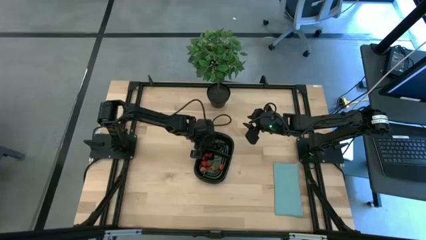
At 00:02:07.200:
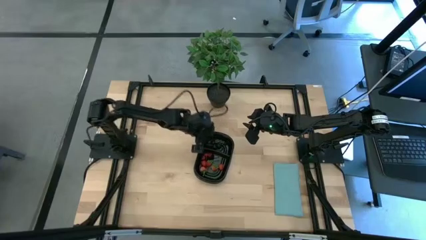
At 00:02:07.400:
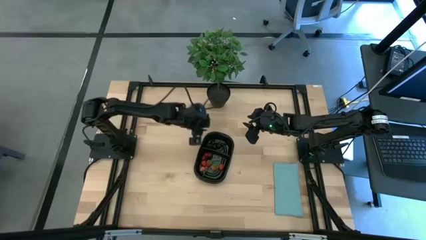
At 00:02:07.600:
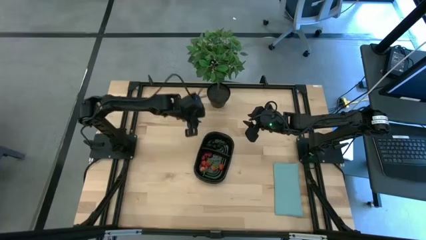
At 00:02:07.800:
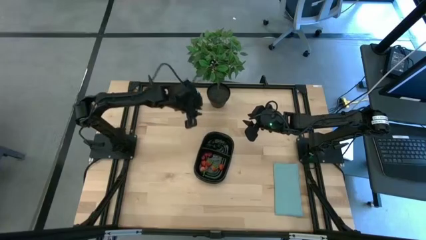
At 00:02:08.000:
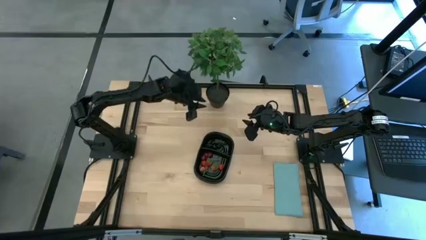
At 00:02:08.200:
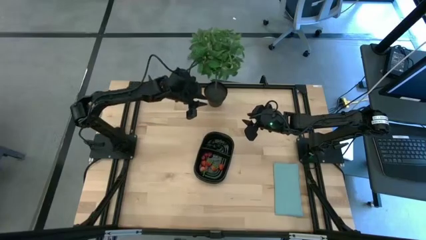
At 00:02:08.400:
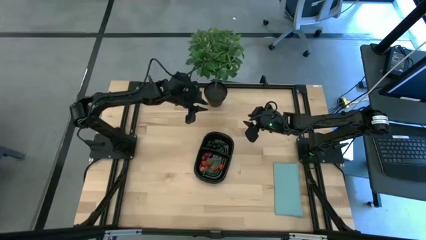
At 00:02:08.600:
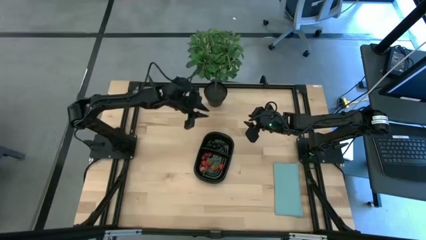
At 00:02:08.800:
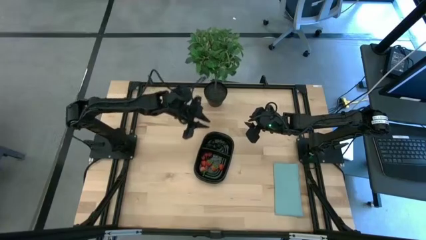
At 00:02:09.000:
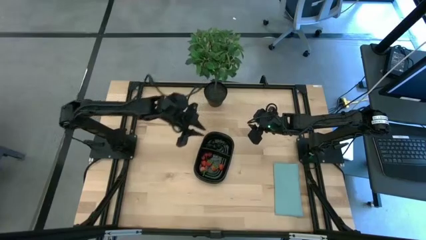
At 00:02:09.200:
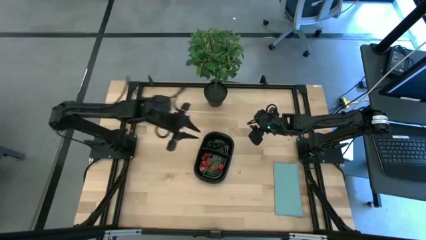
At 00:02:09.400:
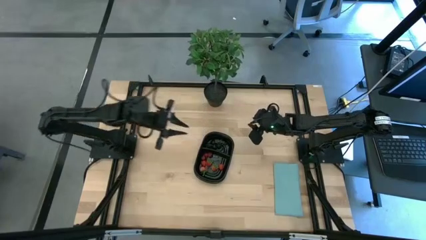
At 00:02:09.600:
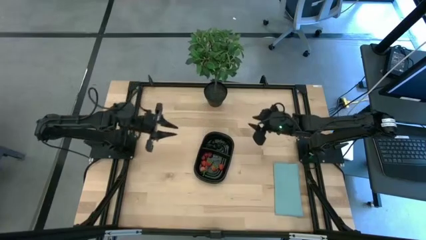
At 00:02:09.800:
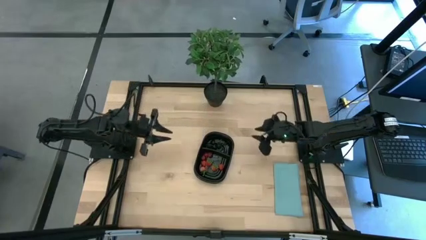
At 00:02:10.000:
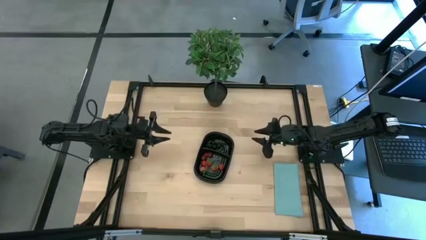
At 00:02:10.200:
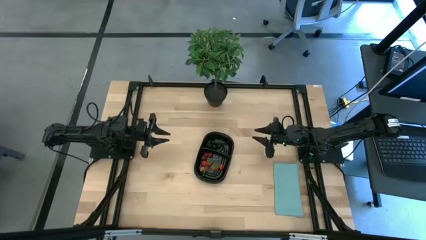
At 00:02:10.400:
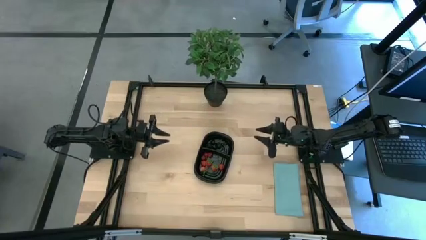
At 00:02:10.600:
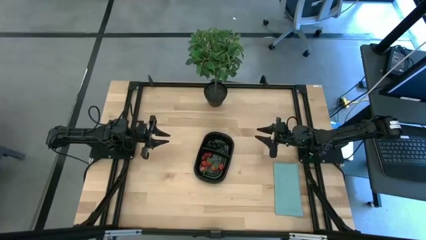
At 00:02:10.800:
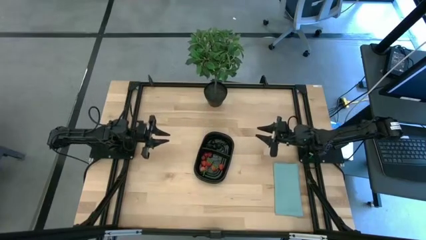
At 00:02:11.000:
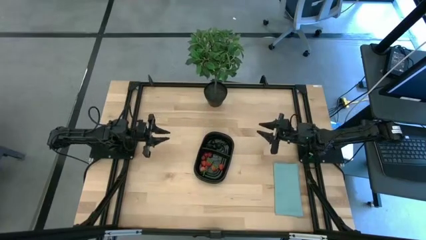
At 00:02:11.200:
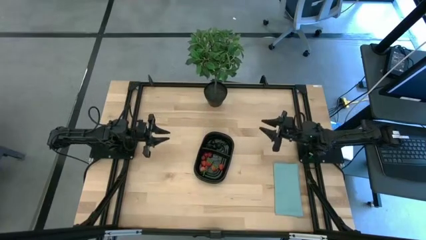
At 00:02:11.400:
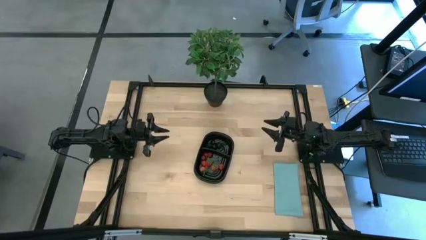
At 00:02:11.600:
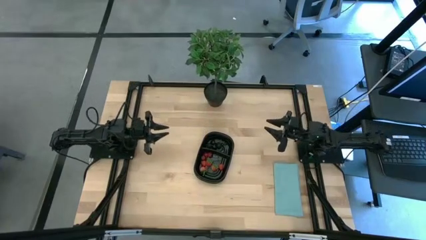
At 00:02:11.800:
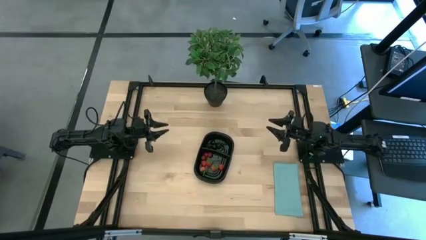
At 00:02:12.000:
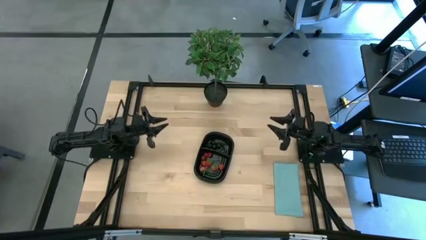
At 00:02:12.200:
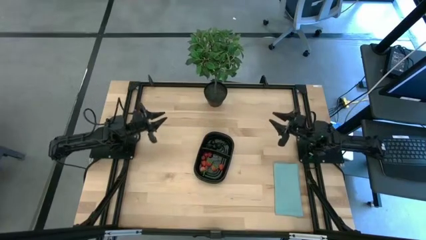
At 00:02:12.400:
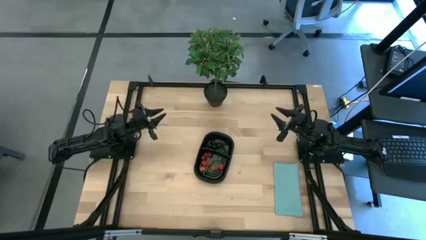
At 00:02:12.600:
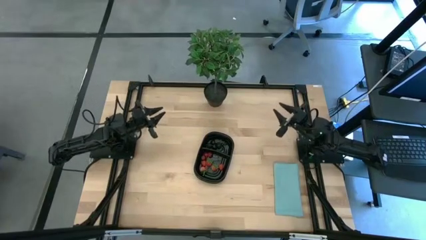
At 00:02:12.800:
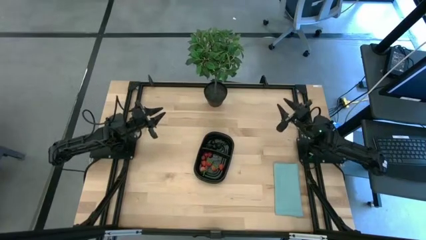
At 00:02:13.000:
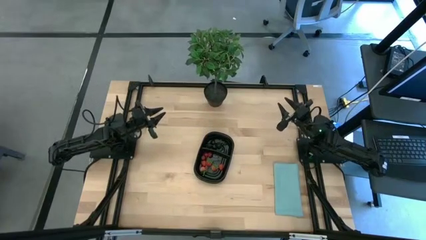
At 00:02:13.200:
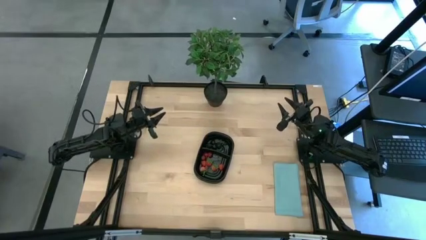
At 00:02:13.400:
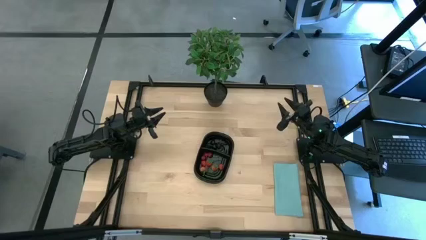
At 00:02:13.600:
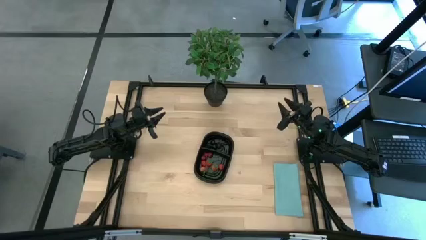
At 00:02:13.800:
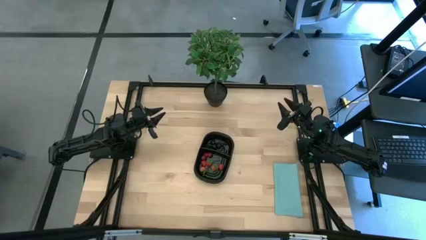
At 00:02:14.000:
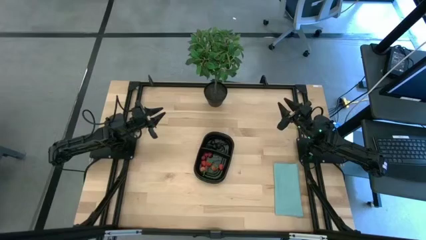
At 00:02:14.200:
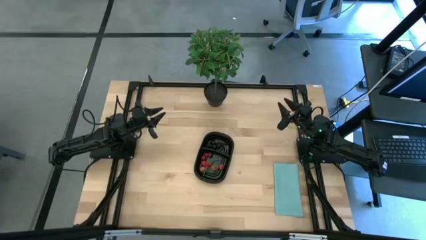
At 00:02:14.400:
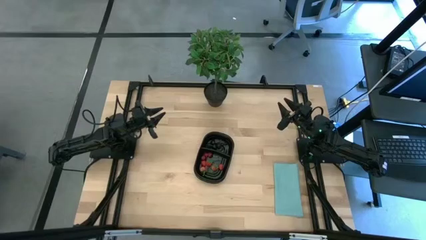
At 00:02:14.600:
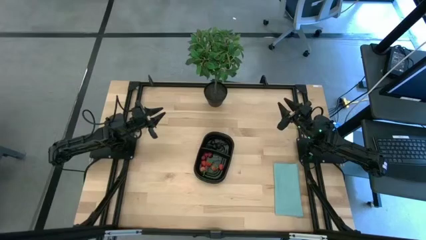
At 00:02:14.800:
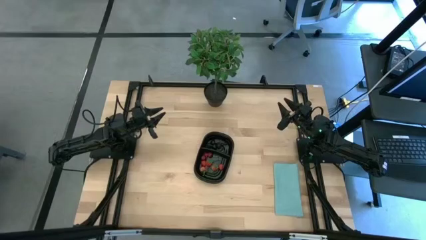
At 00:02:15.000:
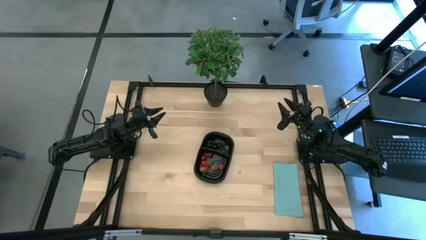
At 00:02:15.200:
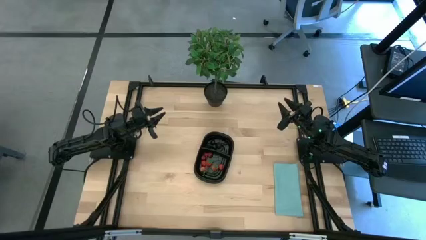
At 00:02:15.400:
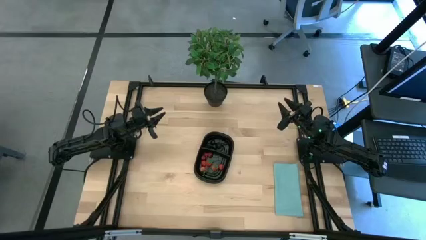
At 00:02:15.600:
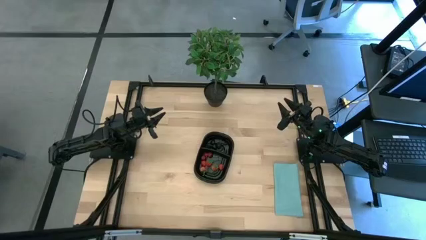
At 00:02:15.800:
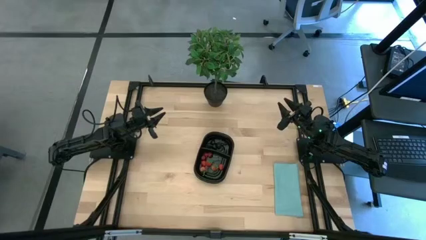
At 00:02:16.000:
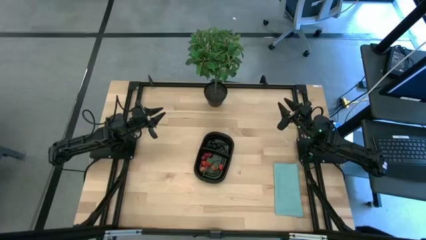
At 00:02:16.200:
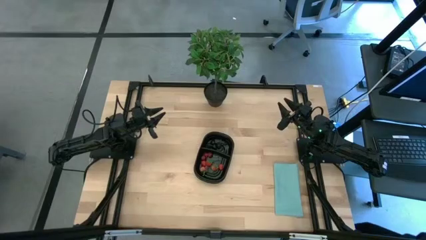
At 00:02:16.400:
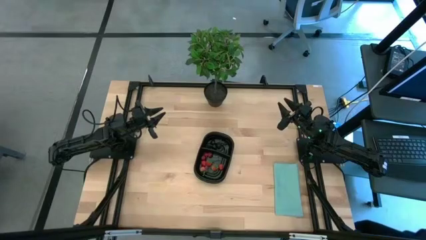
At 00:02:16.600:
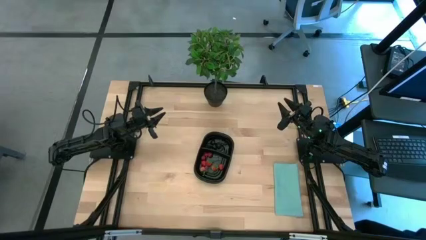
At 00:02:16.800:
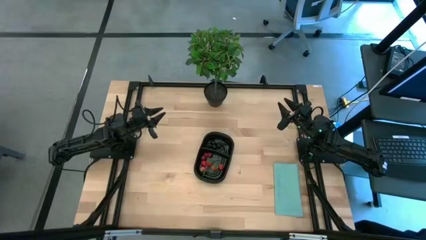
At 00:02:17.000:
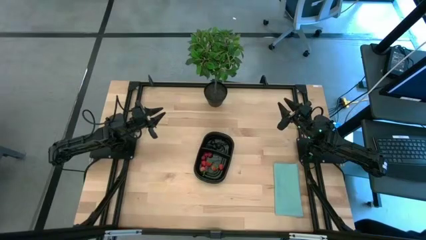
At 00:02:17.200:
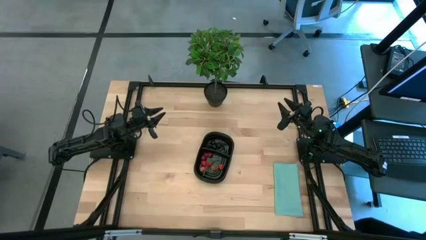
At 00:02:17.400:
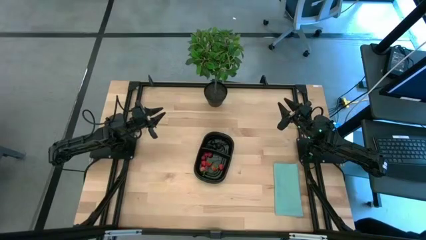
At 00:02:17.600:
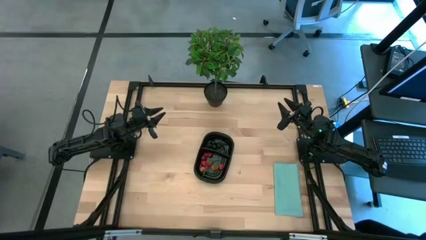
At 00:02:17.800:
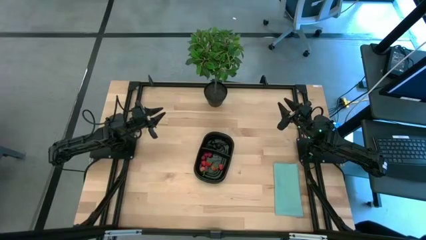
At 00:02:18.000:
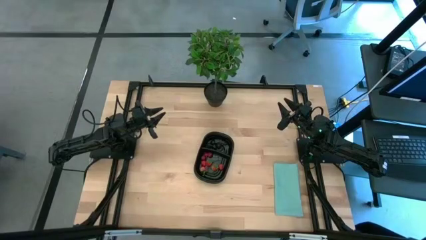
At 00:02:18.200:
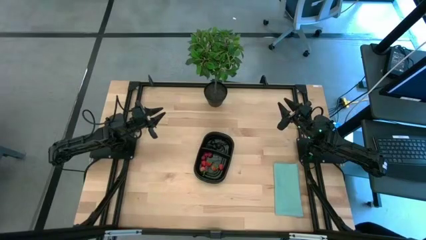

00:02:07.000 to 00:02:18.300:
Task: Pick and placing Produce into tupperware
Return to Home Position

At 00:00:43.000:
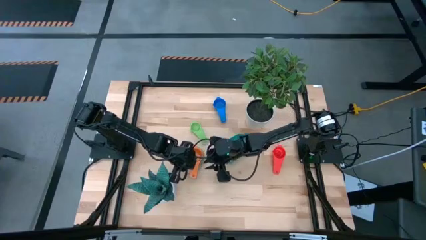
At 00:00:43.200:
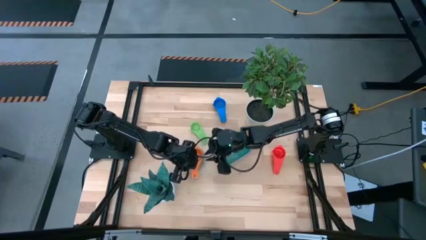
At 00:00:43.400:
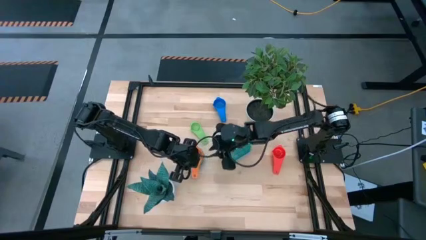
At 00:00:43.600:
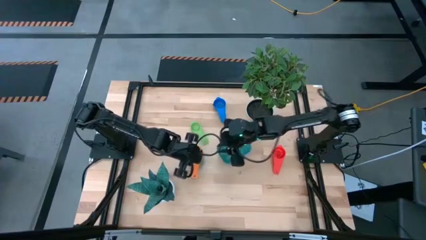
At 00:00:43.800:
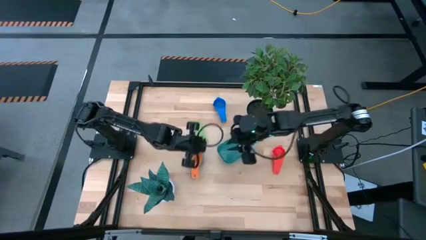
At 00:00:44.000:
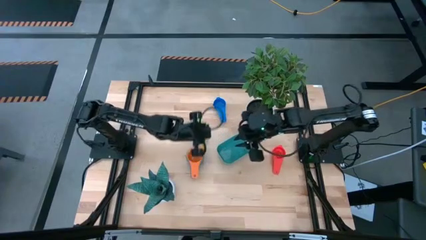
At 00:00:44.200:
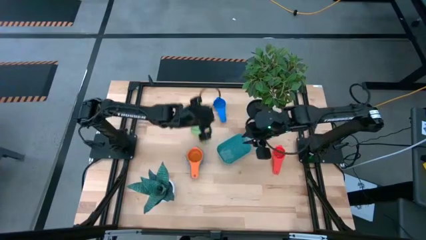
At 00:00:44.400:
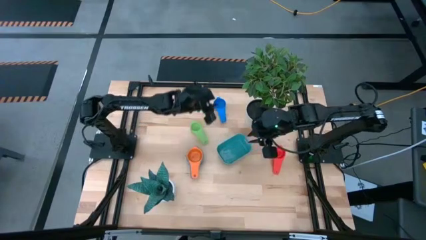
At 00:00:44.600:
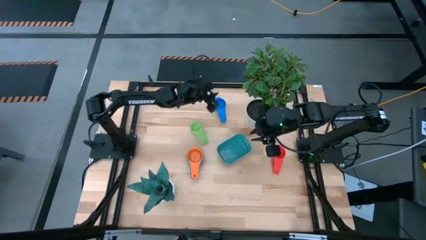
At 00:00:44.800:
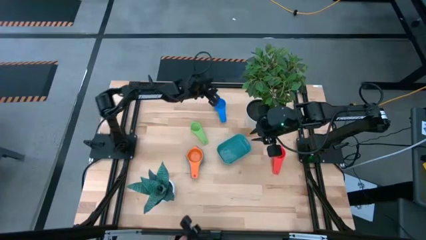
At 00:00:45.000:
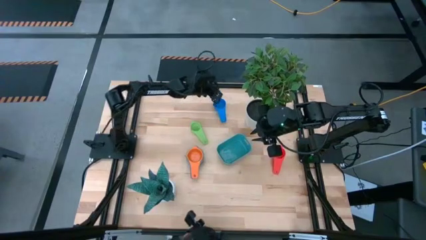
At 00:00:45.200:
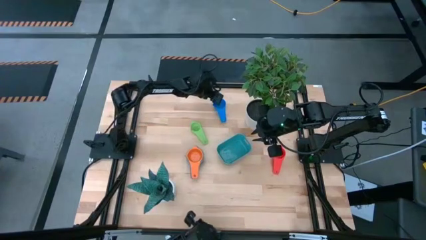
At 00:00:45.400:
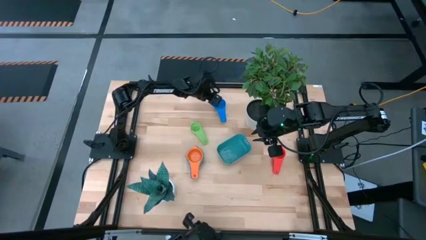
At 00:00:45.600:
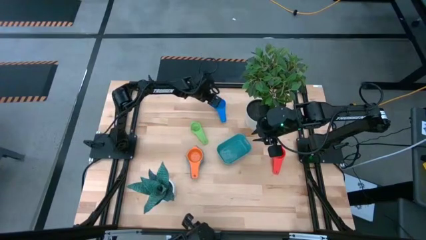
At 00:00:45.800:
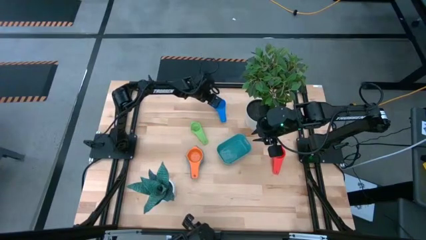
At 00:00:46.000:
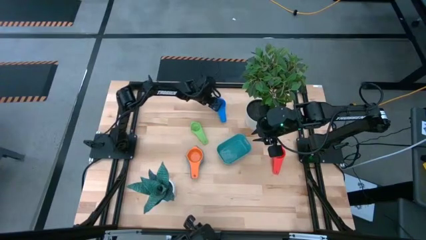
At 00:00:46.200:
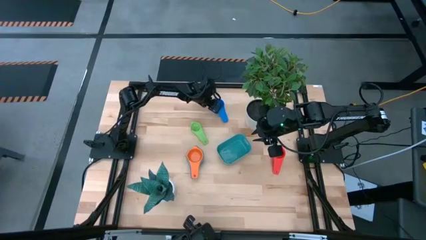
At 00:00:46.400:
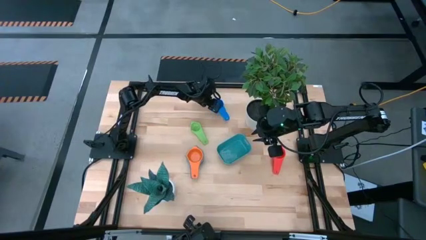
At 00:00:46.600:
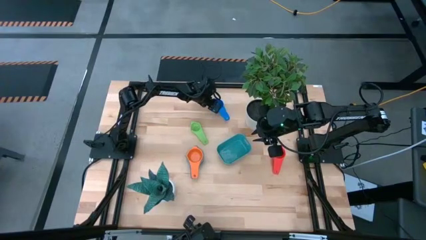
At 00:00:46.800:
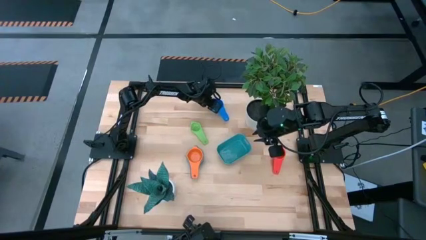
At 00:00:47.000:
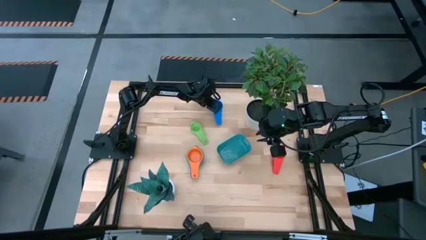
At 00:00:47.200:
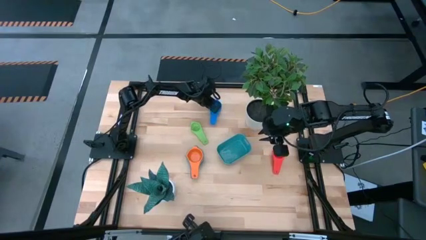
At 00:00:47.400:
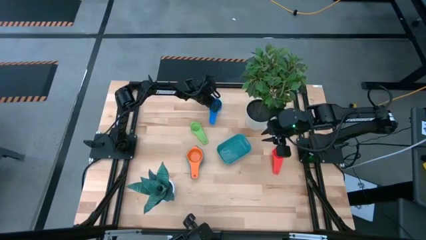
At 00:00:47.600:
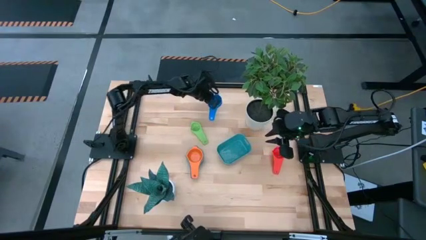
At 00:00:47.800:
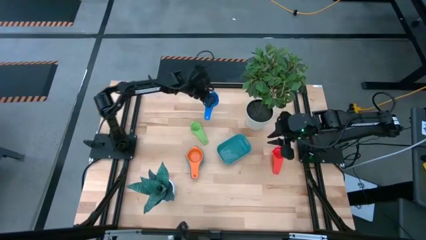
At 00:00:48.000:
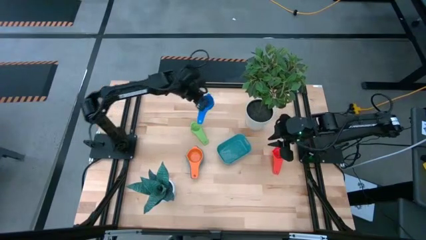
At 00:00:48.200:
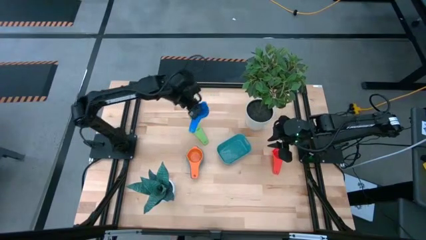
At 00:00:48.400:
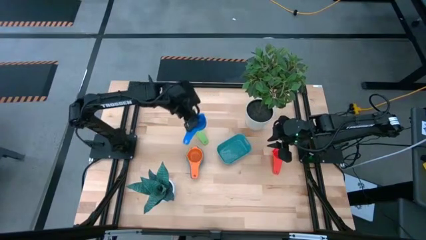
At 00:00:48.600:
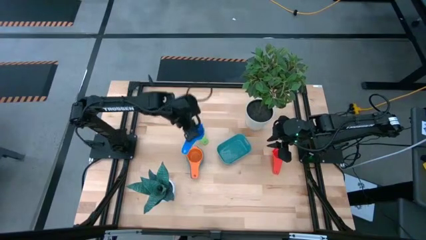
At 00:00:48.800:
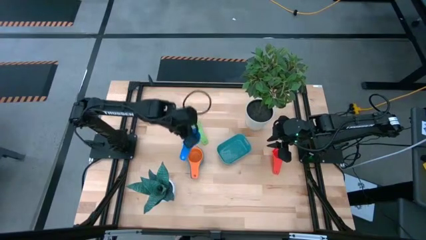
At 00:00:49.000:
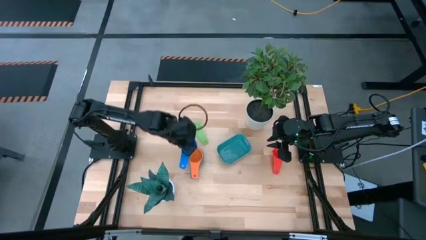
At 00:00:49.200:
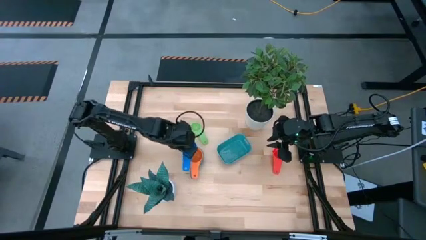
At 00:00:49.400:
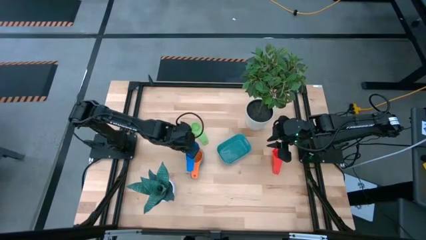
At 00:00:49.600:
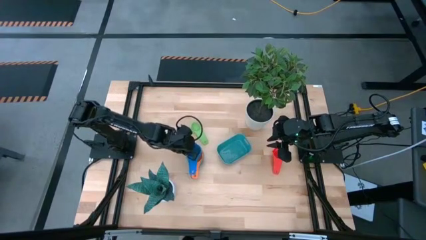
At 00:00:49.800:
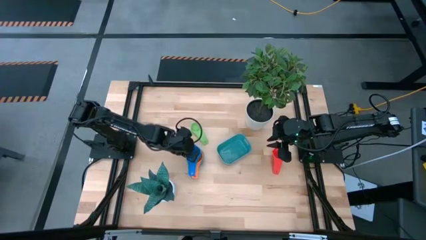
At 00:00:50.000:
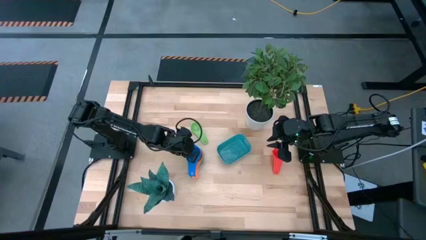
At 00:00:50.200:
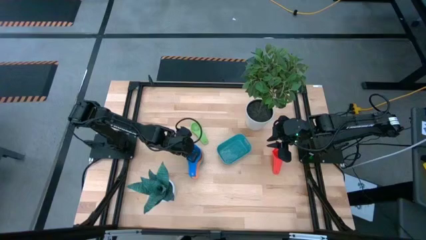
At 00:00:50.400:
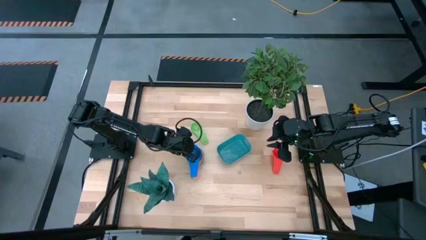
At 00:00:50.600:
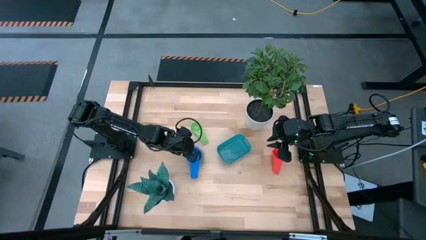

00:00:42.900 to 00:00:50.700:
Task: Nest measuring cups in basket
Stack the blue measuring cup on top of the orange measuring cup
